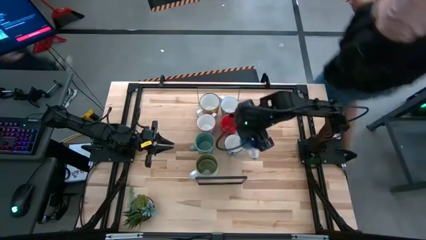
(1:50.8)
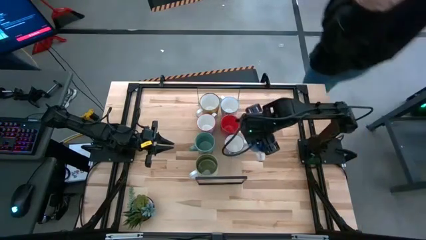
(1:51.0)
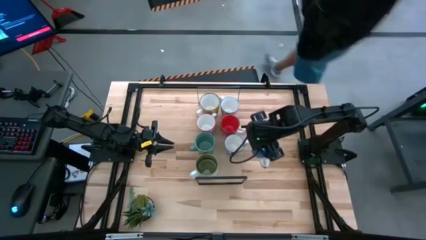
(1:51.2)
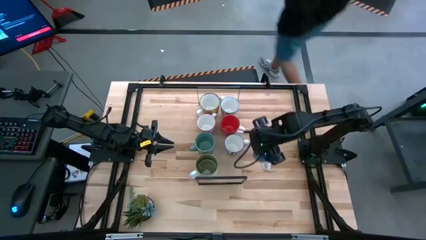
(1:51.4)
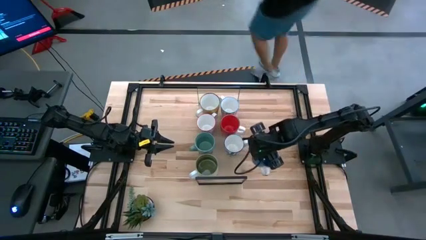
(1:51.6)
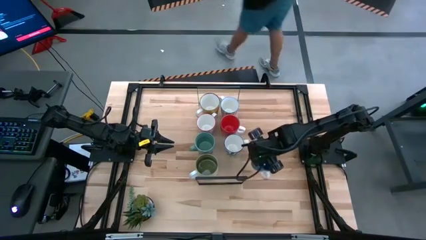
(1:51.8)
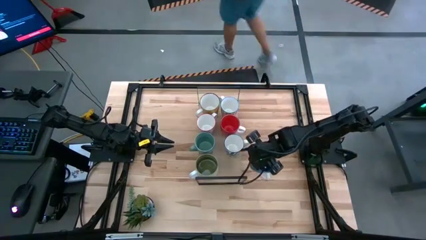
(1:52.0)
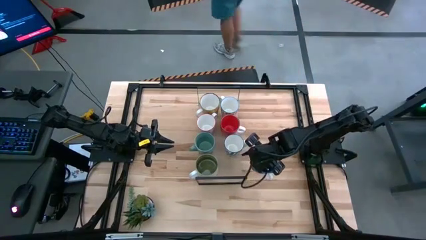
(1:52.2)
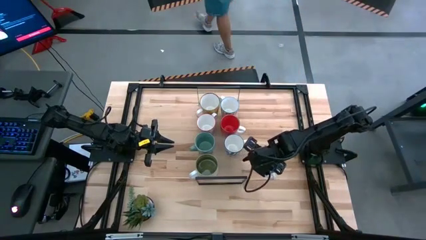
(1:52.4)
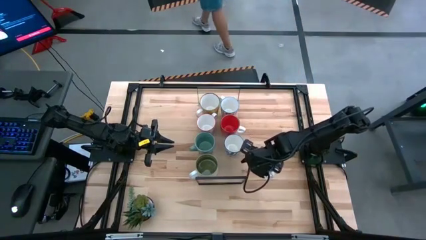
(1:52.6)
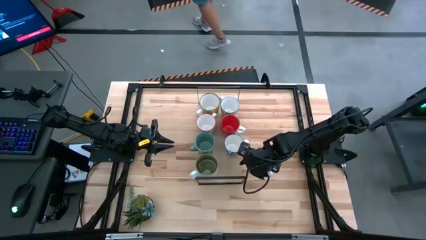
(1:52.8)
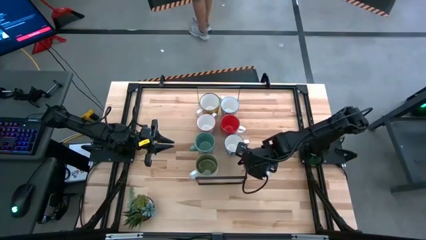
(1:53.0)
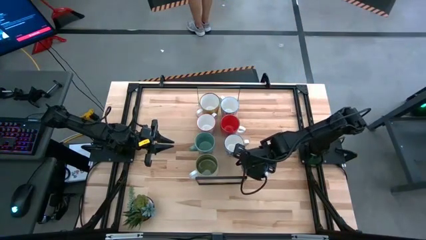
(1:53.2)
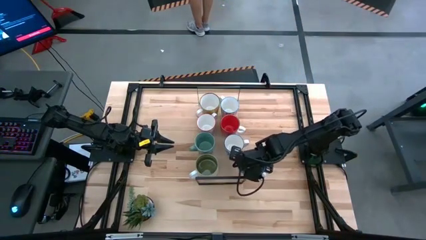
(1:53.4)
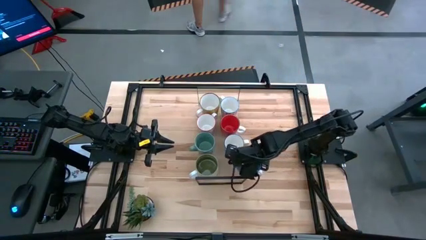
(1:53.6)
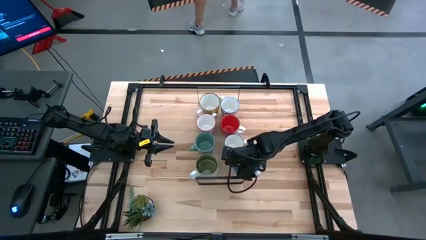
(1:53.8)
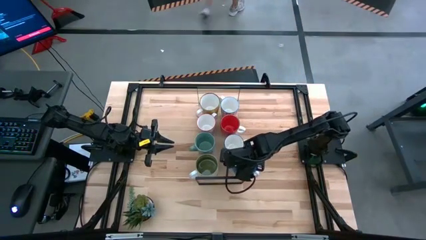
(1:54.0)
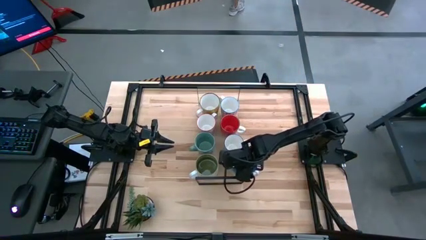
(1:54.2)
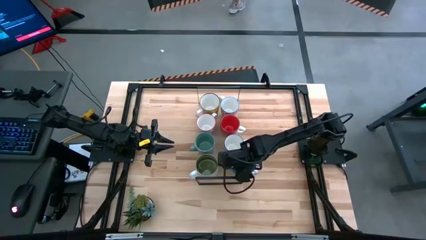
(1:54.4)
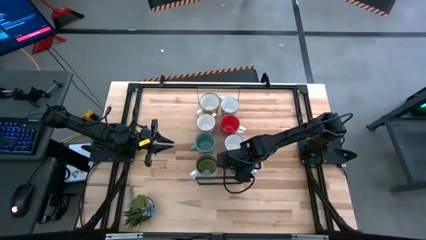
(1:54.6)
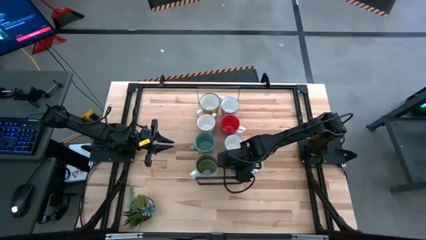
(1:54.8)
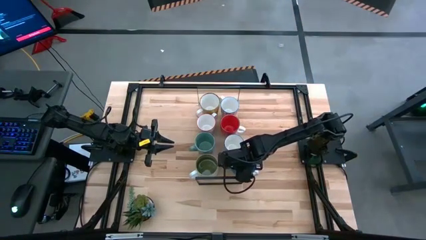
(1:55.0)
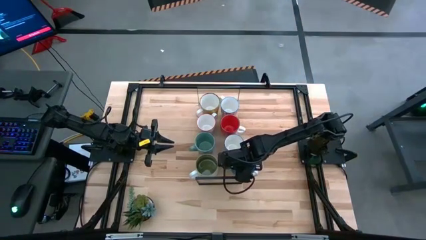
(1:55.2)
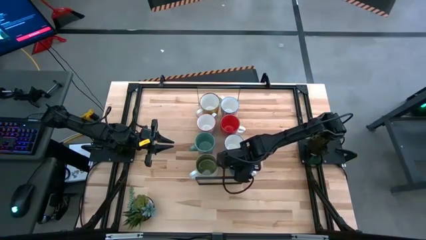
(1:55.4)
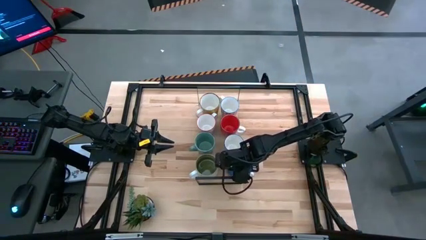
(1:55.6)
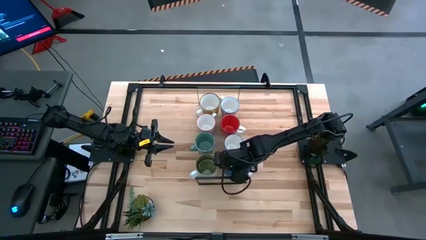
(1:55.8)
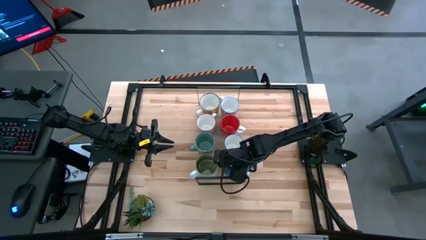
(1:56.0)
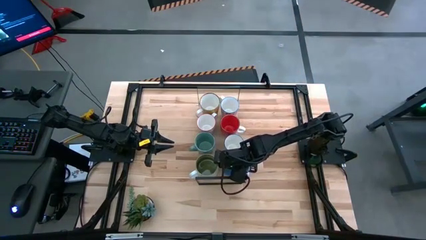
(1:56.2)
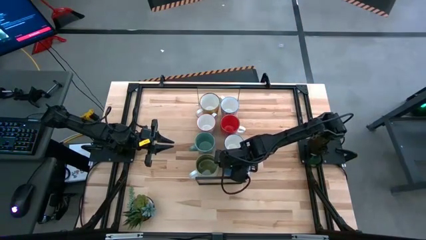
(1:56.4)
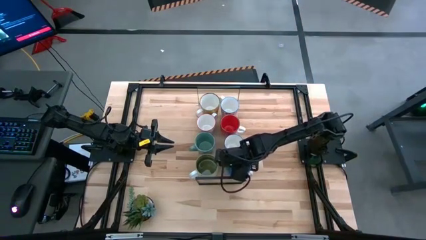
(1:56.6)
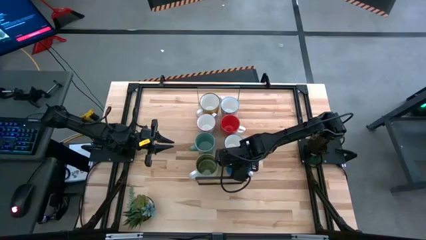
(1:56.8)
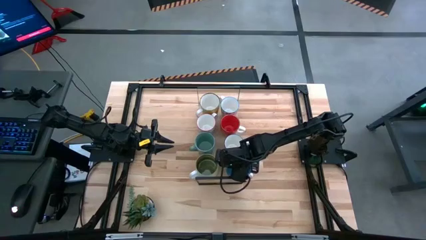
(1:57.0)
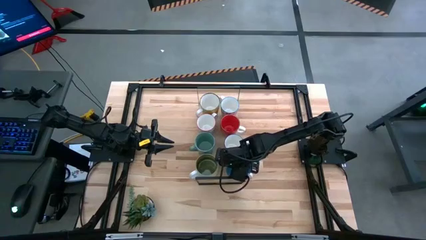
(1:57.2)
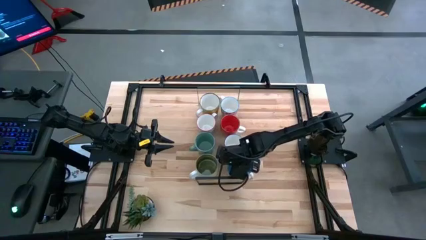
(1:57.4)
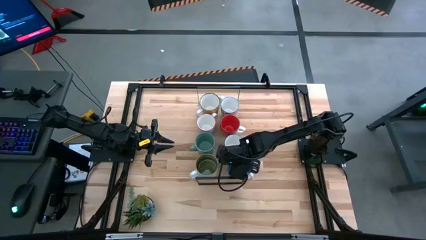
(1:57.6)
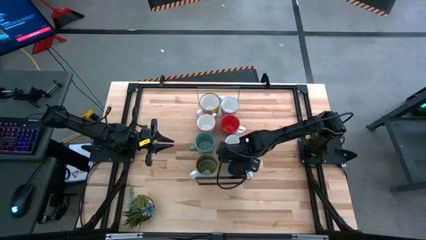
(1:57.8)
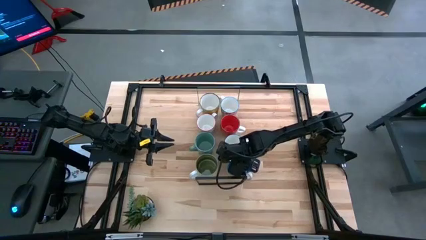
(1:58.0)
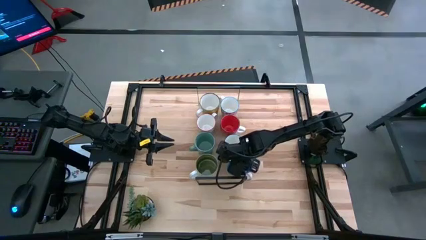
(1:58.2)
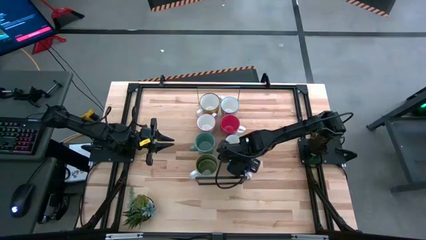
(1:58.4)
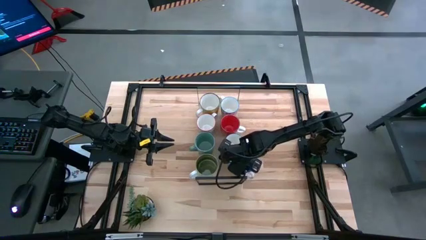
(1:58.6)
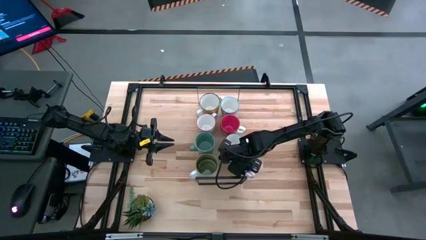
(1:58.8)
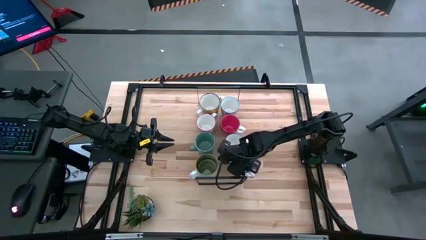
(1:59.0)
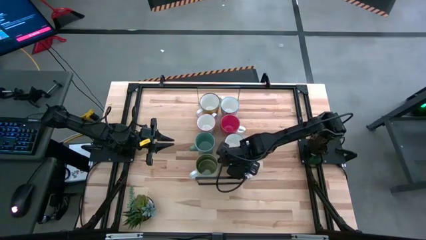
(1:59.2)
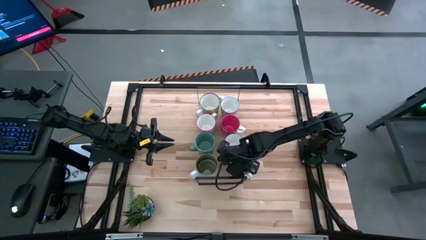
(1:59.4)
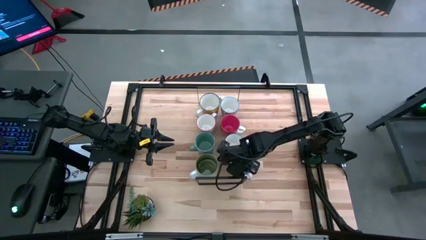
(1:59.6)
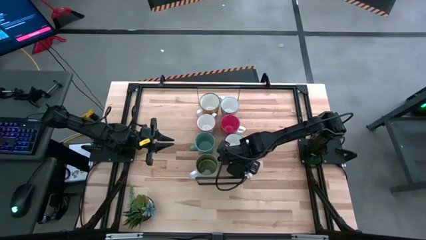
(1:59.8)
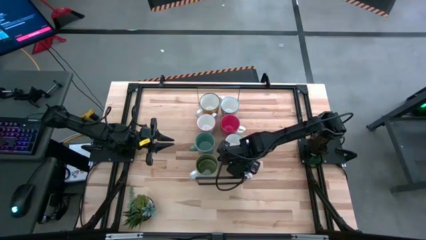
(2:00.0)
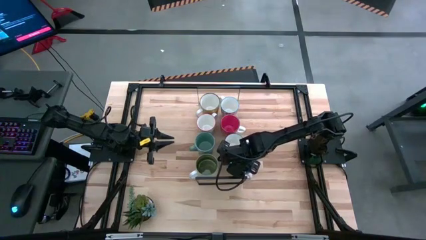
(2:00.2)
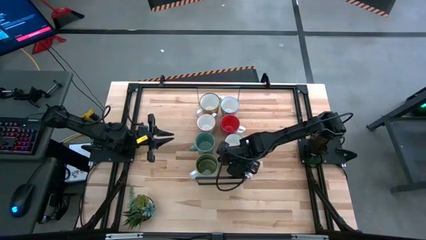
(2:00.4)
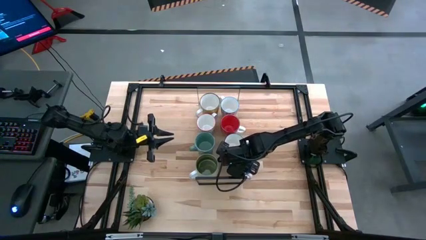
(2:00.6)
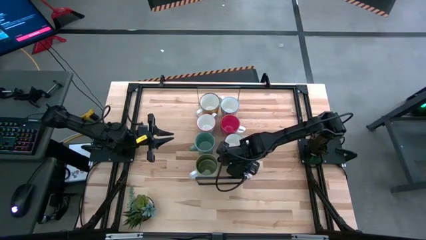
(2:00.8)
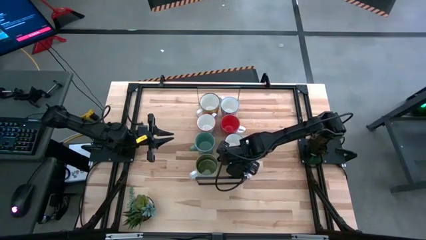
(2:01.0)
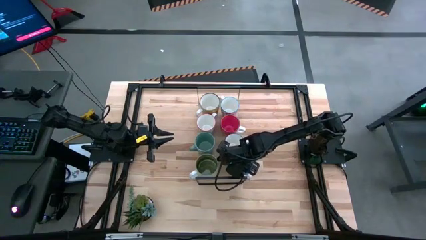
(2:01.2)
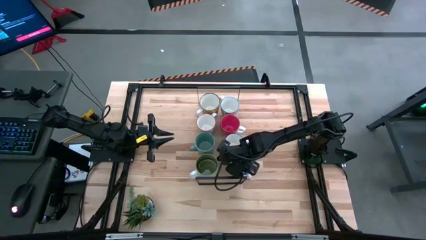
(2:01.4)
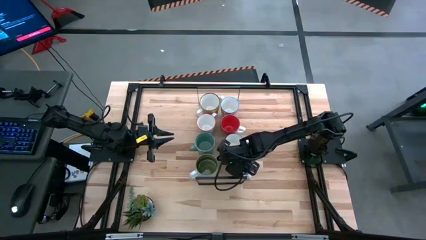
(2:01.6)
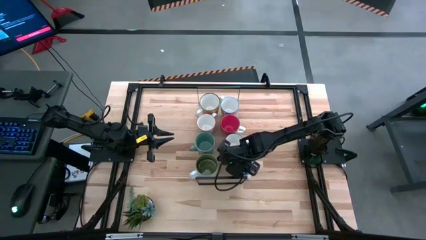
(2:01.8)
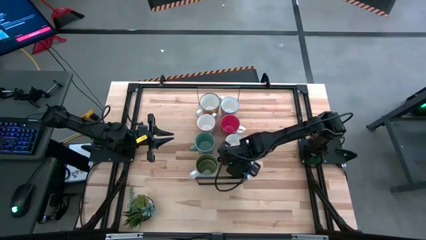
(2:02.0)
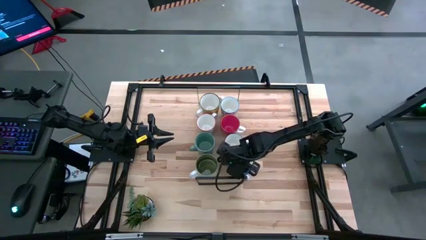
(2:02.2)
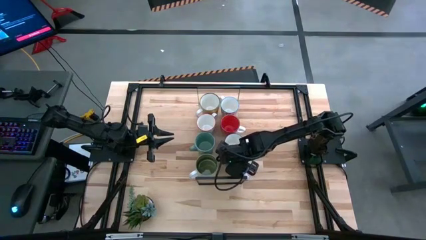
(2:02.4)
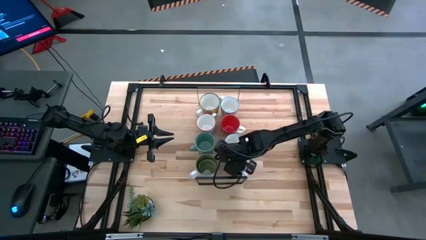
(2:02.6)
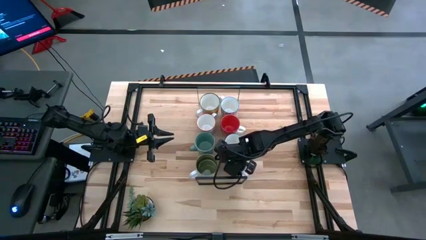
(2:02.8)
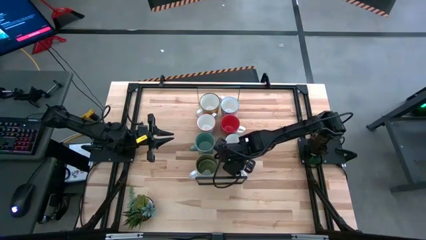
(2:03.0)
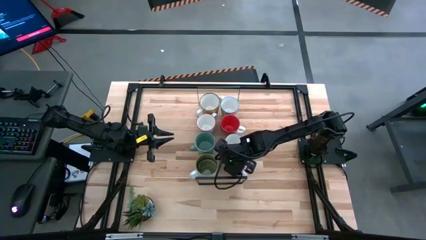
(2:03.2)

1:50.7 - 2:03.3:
Task: Place coffee mugs
Put the blue mug on the shelf

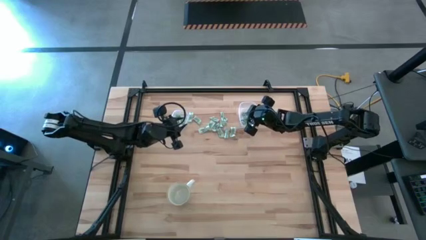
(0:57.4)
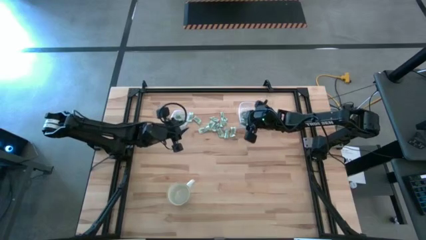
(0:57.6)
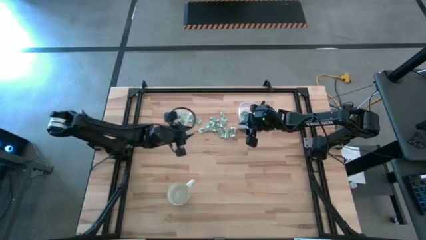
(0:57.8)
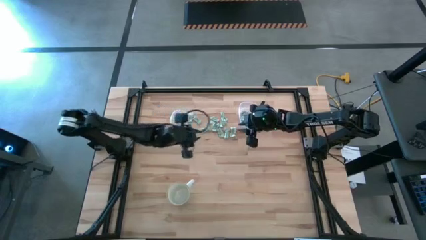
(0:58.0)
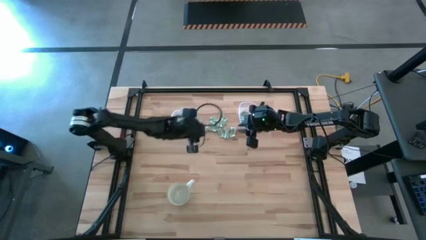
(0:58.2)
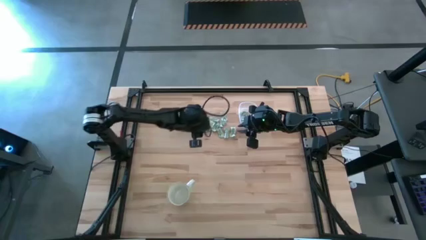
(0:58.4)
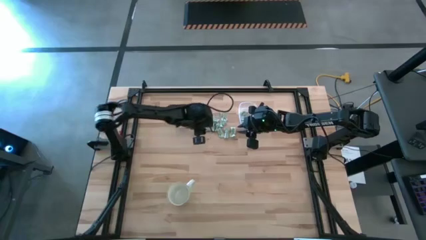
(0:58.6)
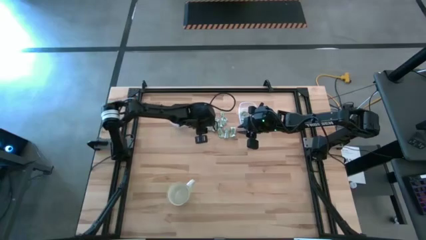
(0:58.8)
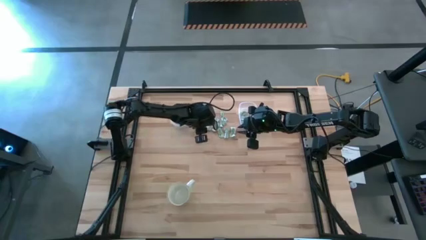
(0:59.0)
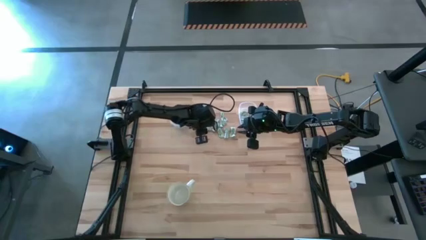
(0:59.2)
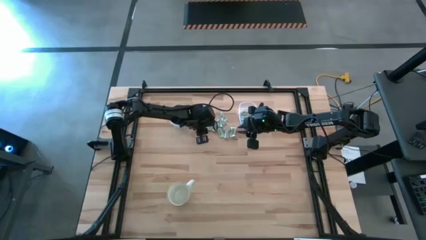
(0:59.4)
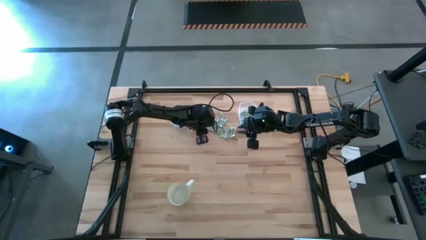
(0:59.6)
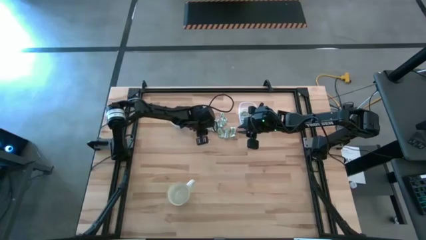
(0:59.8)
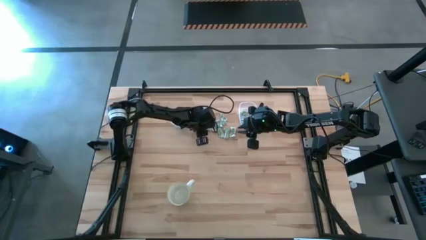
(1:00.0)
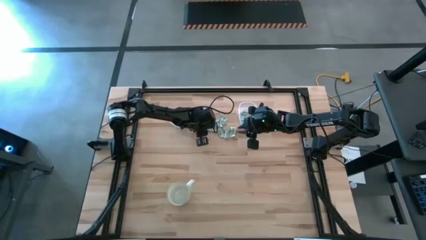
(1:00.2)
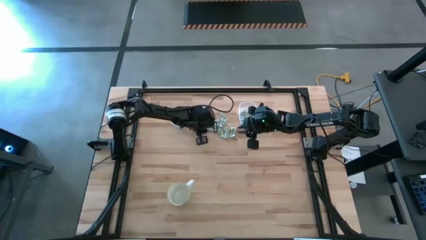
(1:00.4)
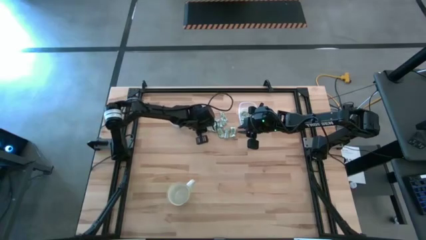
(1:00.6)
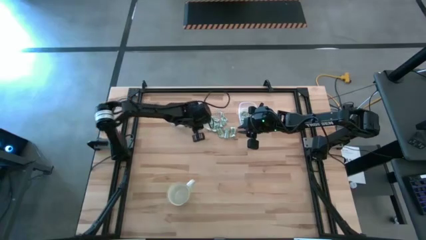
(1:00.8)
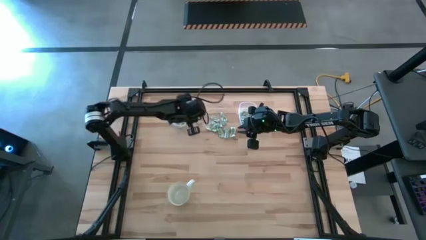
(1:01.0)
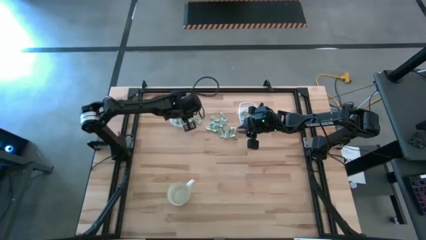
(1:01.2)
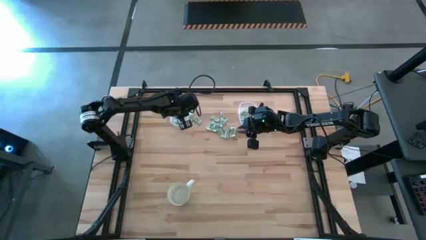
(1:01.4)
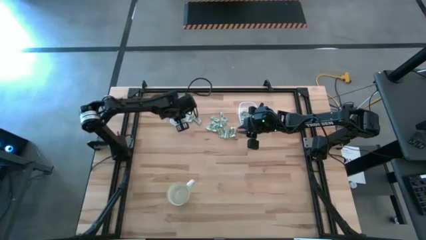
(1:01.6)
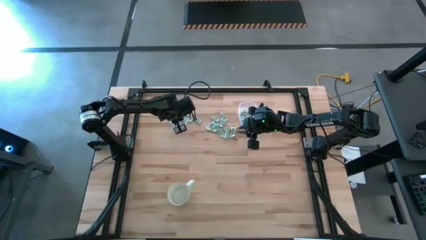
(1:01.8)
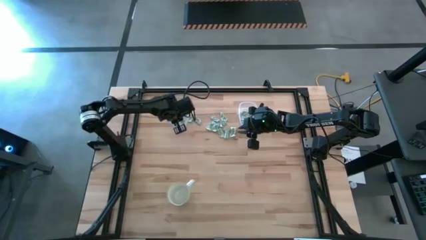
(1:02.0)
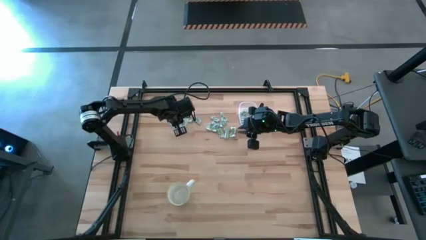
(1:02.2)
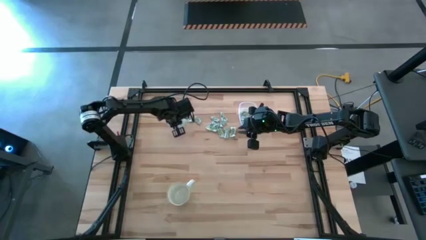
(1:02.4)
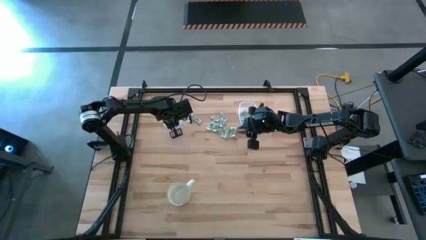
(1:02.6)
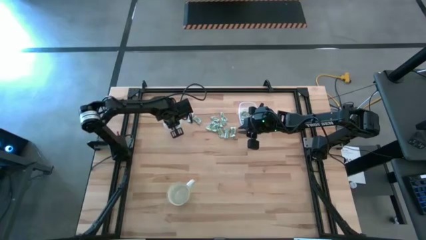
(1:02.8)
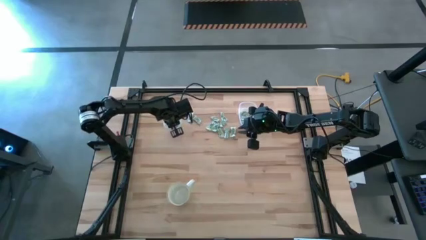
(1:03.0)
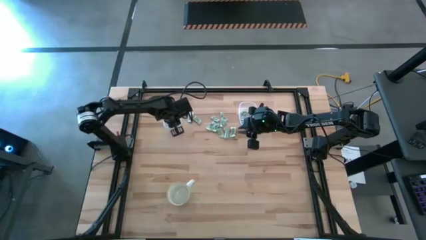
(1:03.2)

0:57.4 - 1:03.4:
Task: Pick and place items into bin
Put the green stevia packet into the square transparent bin
